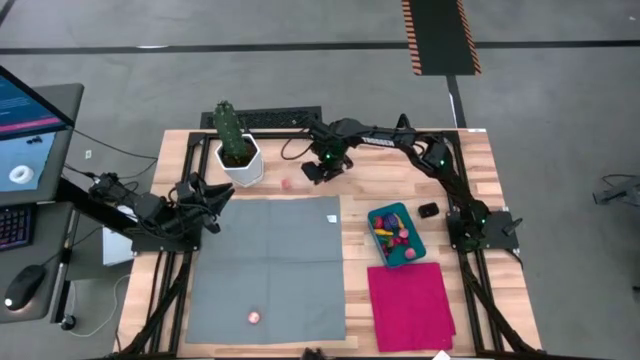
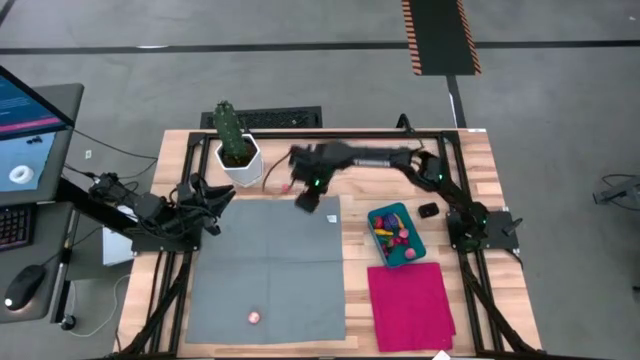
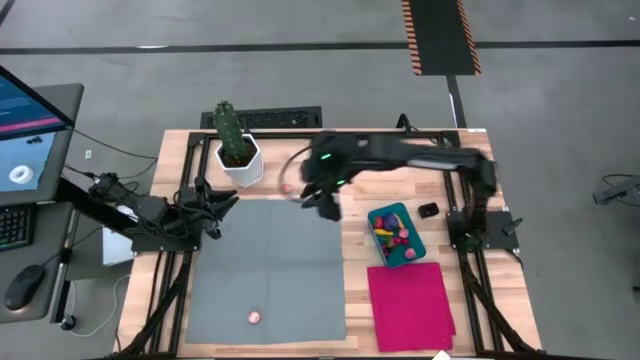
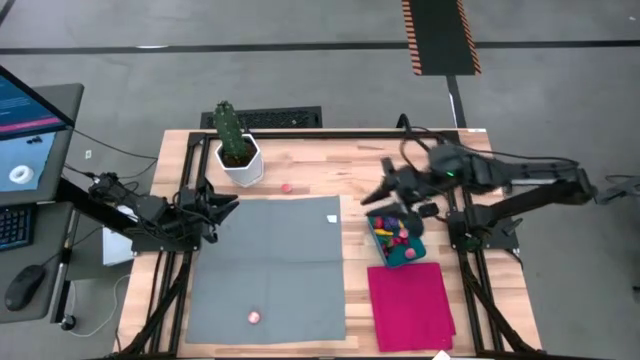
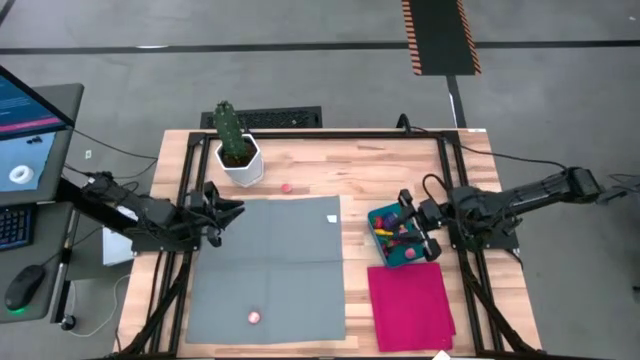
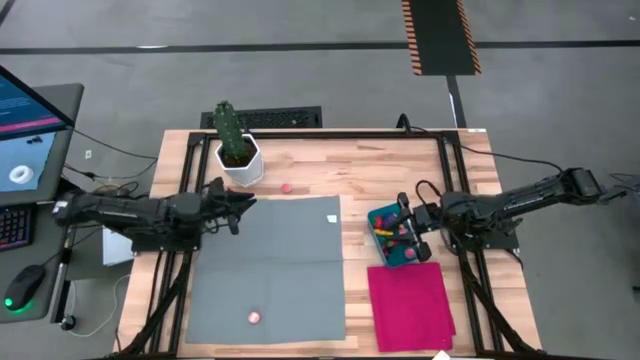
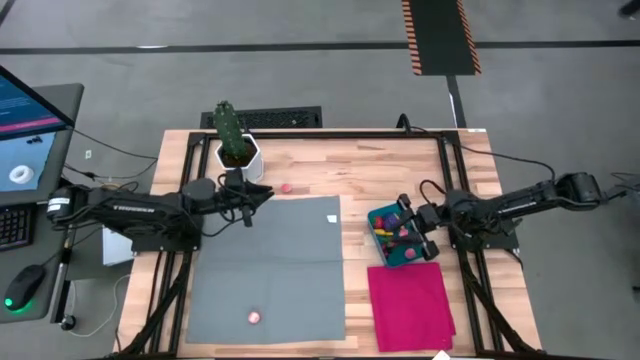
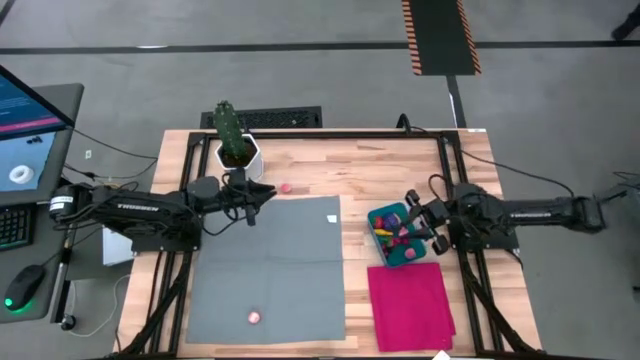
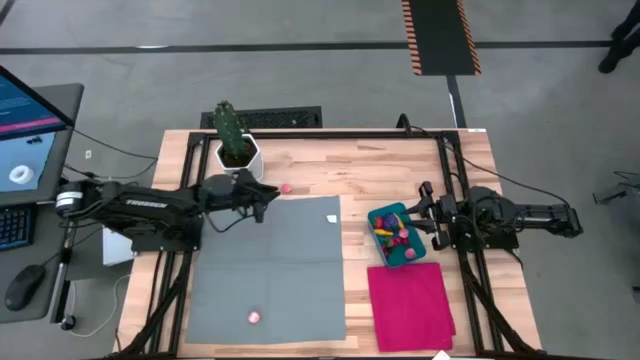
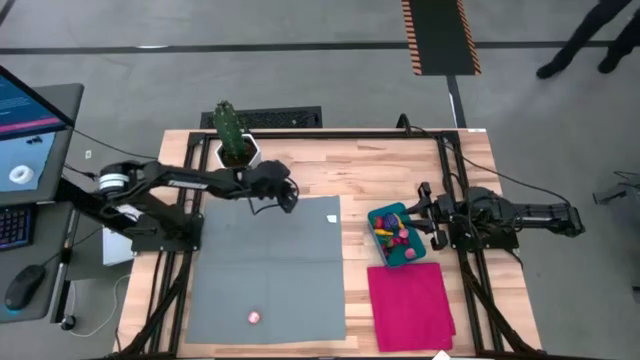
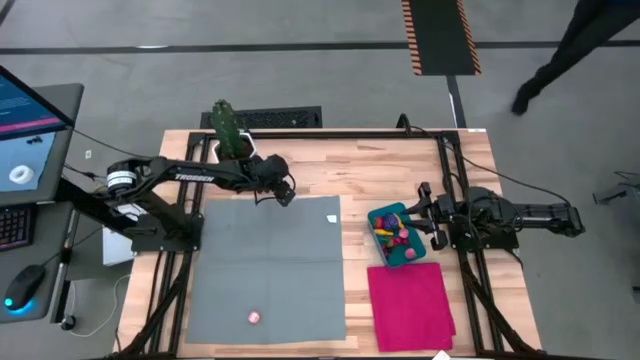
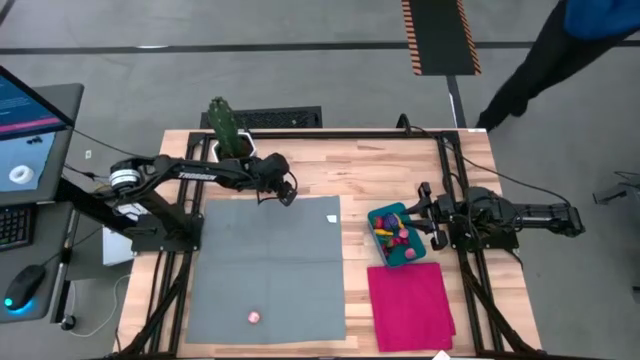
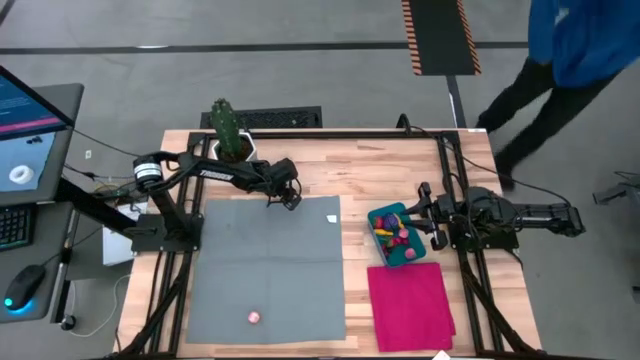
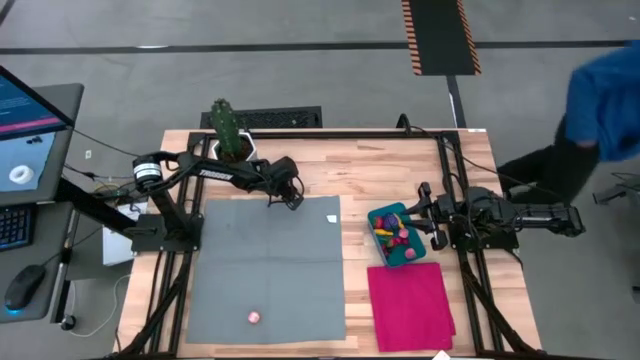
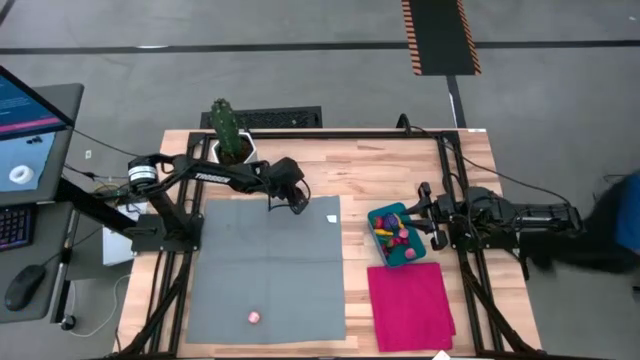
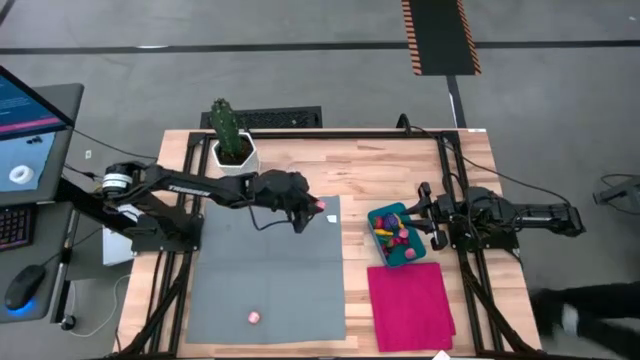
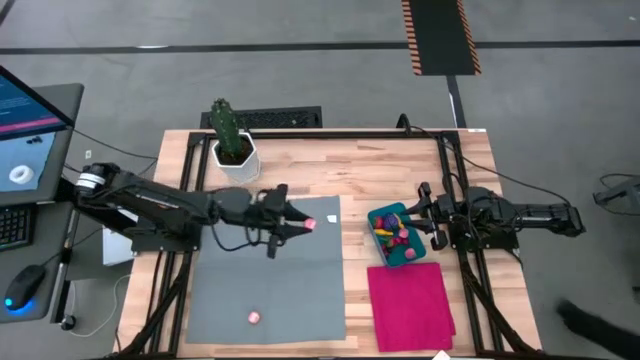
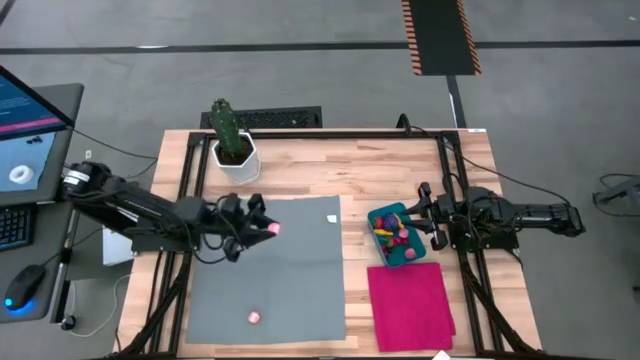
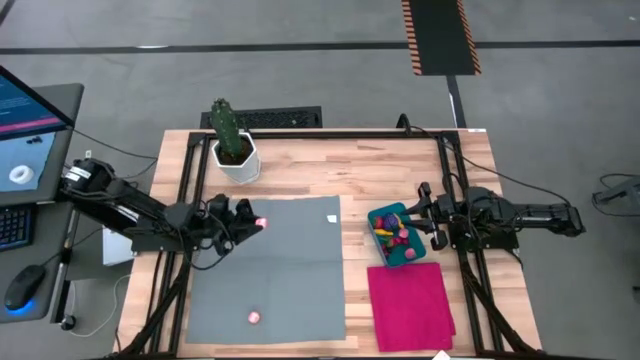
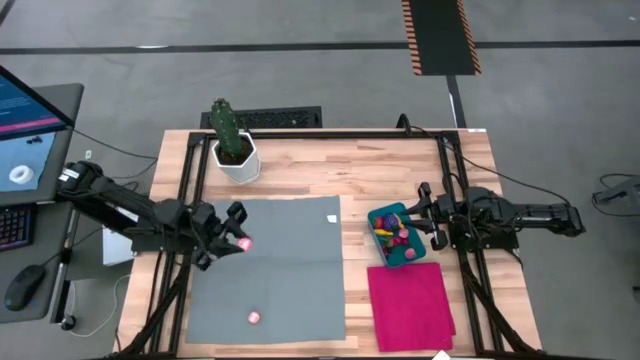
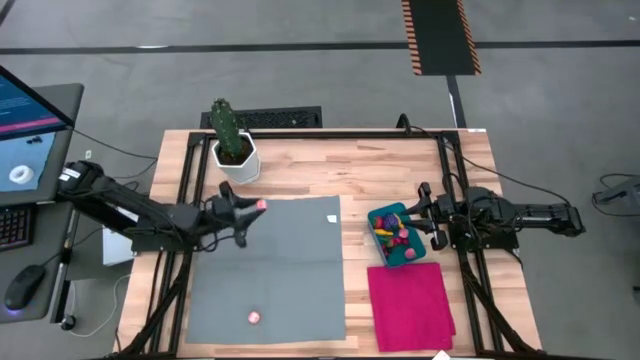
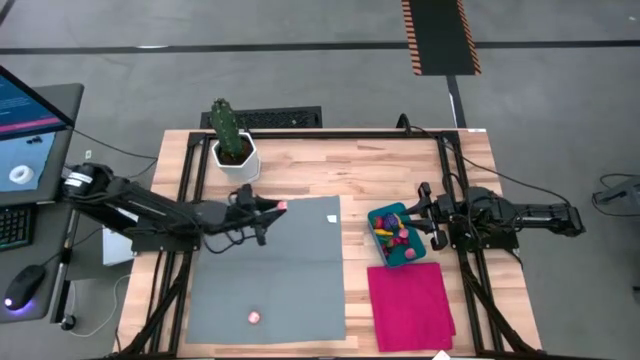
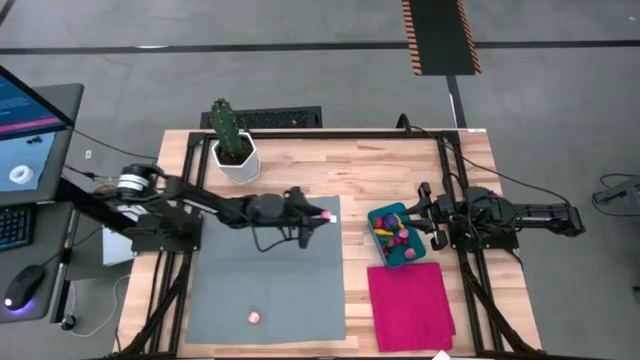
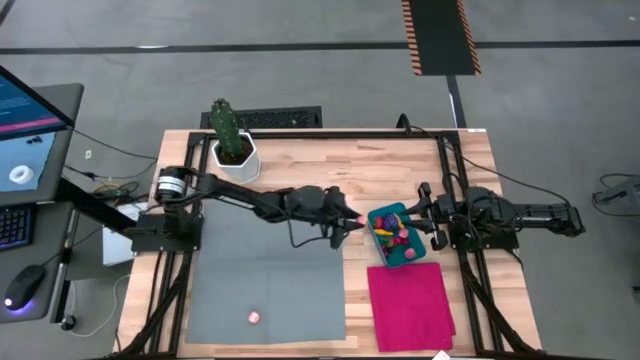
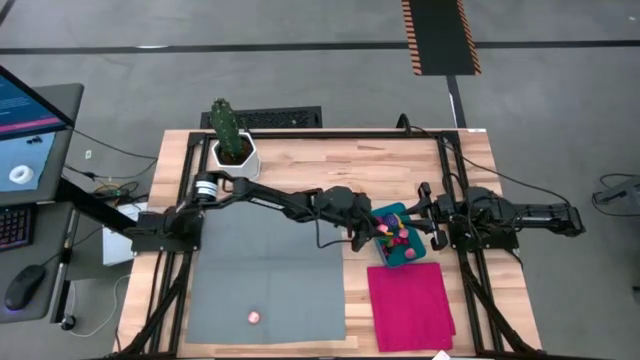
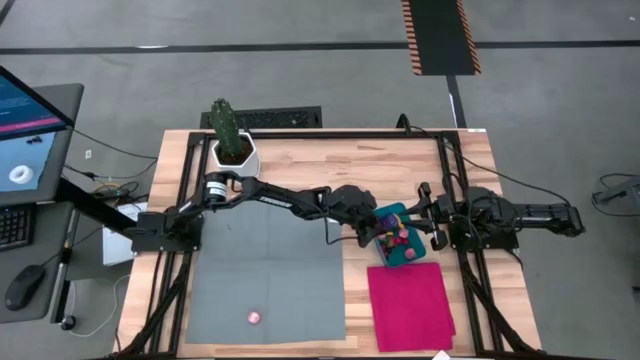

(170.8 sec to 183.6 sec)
Task: Pick and placing Produce into tupperware
Put the pink peach into the blue bin

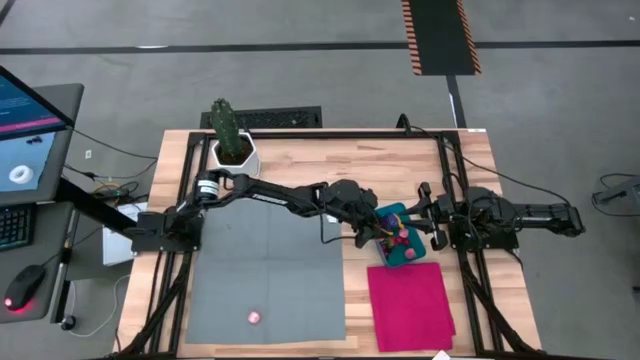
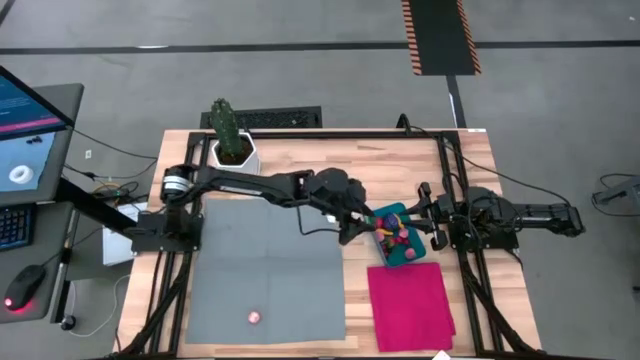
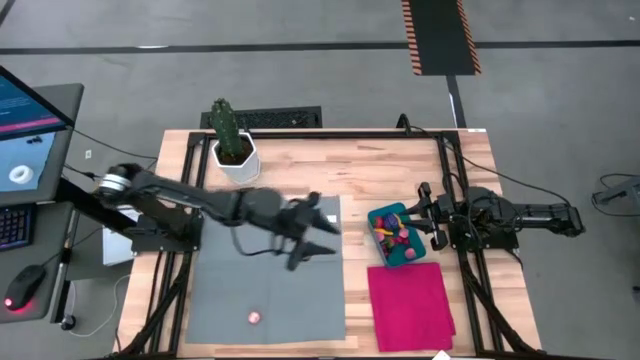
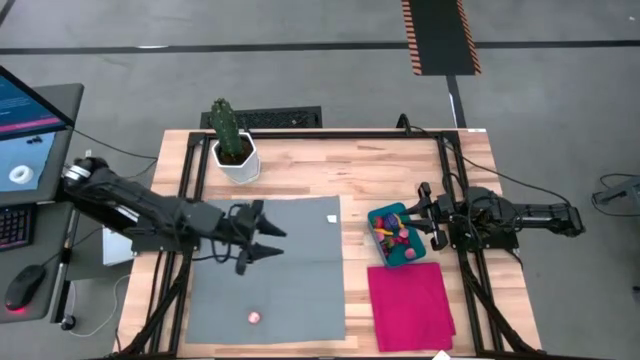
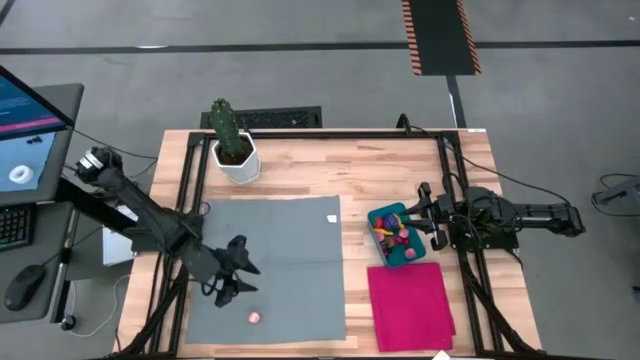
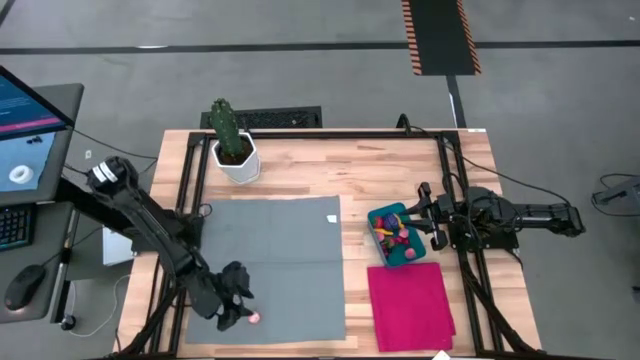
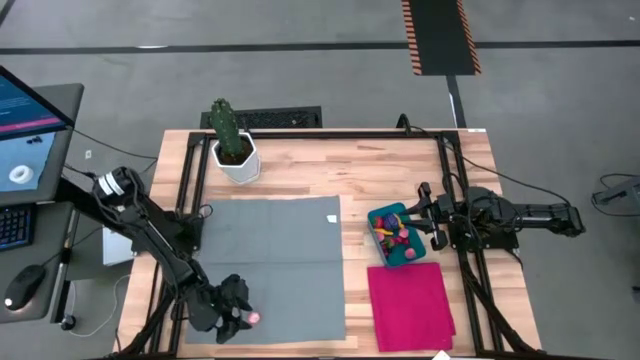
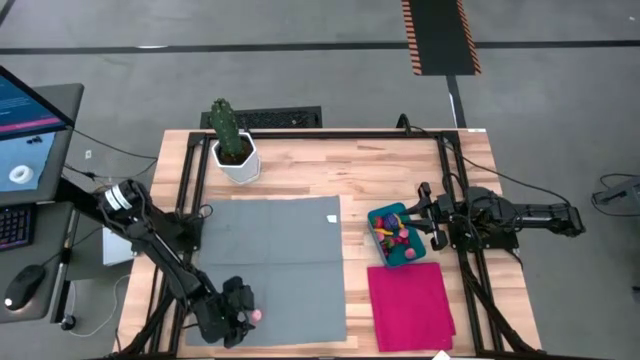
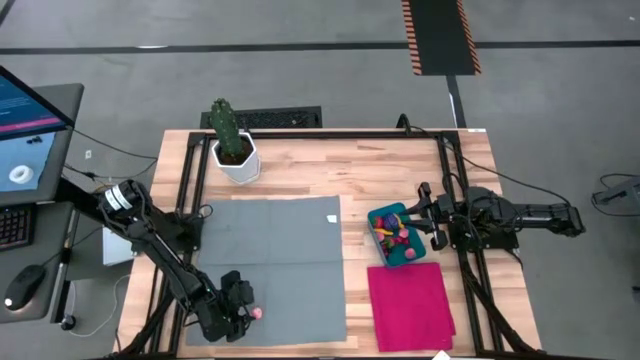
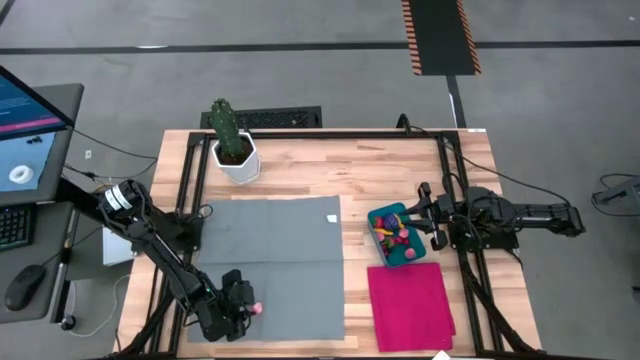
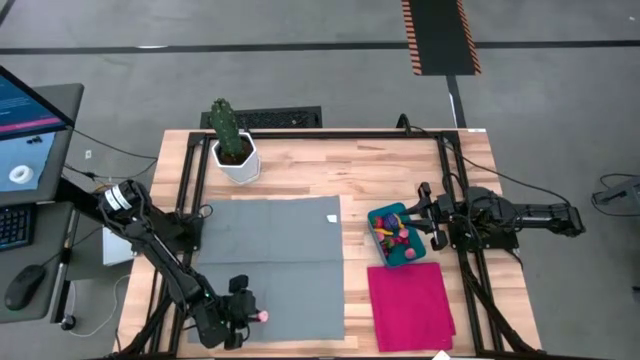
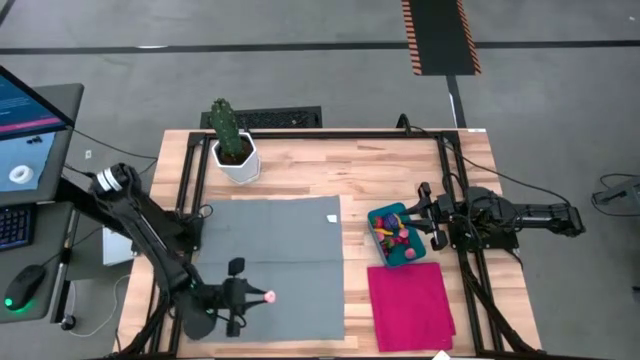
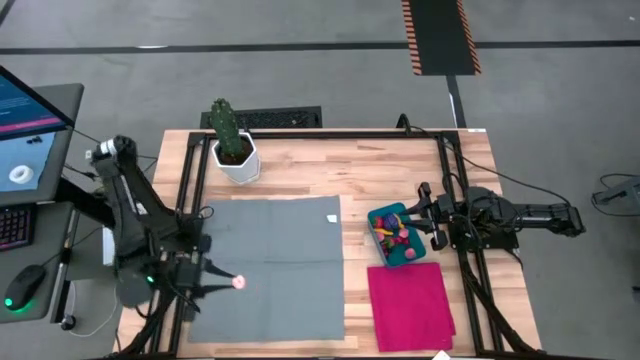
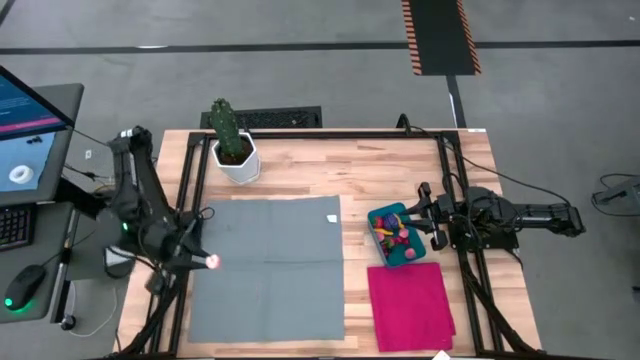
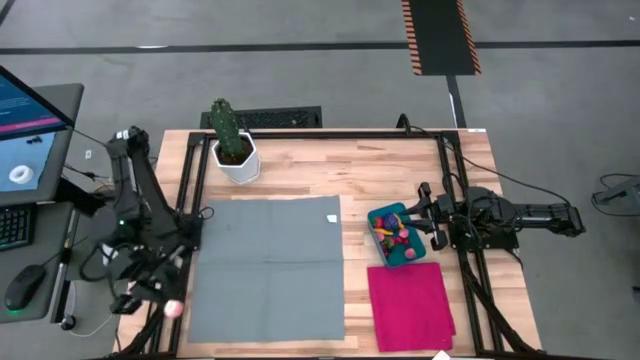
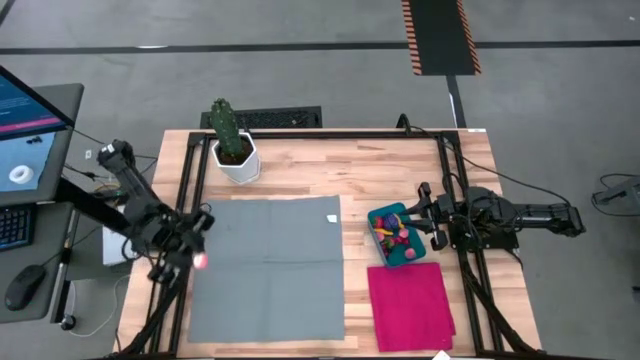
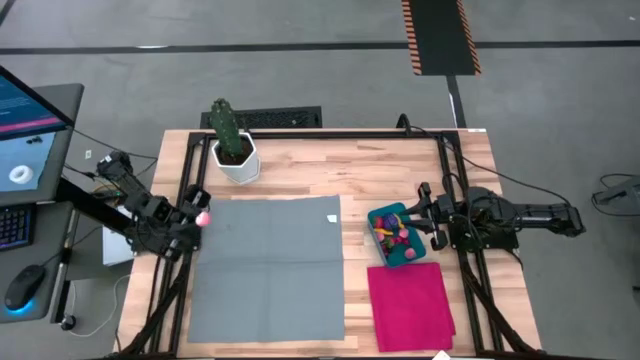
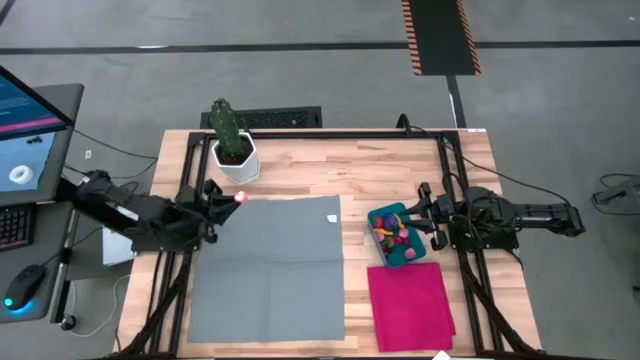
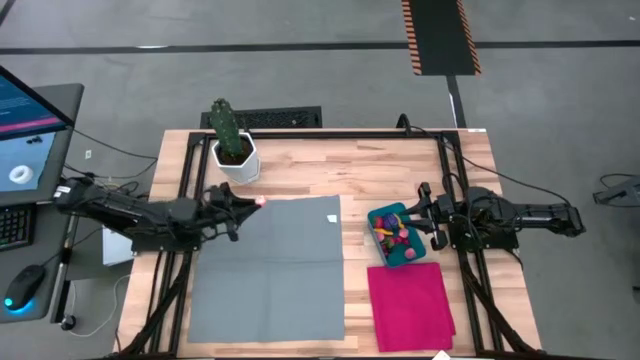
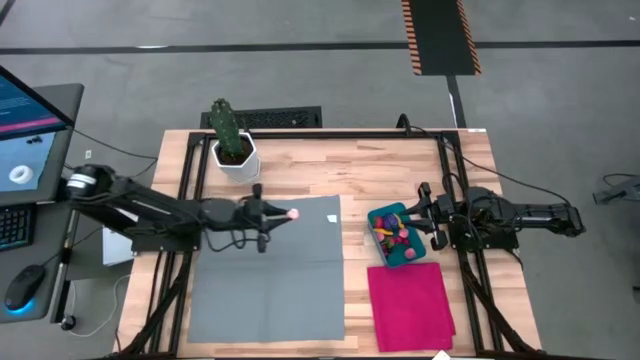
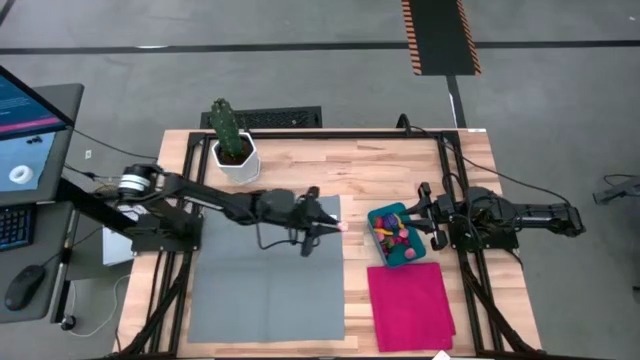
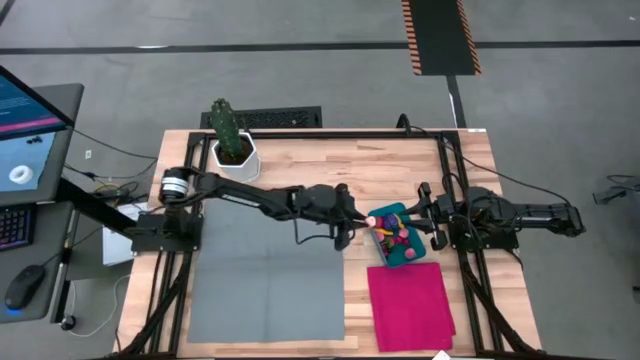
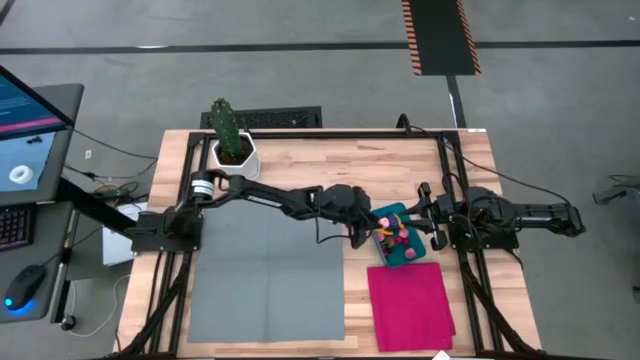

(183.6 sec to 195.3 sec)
Put the pink peach into the blue bin
